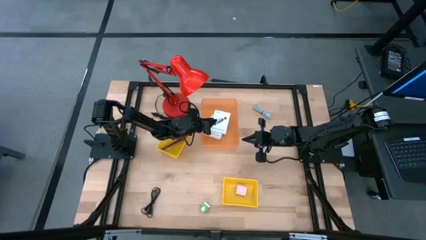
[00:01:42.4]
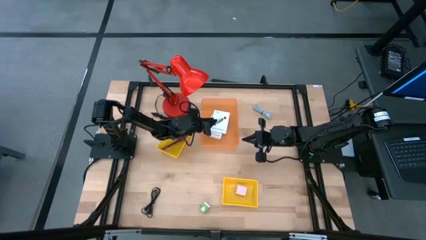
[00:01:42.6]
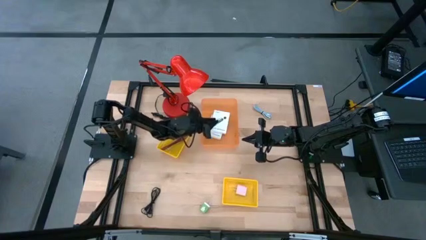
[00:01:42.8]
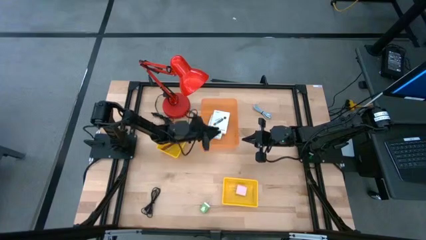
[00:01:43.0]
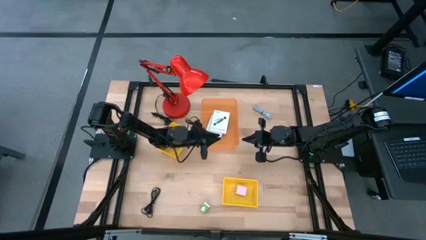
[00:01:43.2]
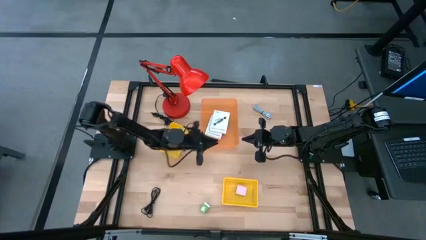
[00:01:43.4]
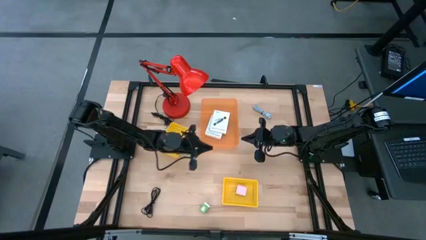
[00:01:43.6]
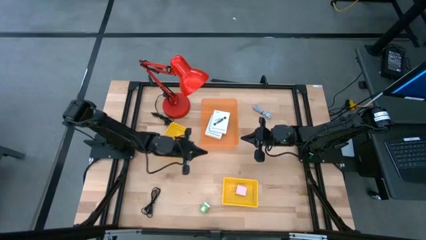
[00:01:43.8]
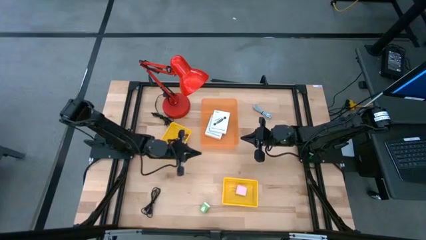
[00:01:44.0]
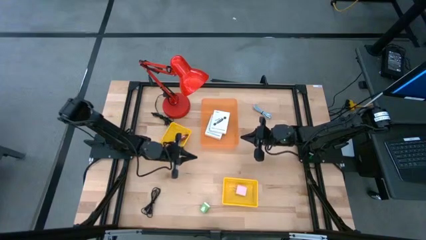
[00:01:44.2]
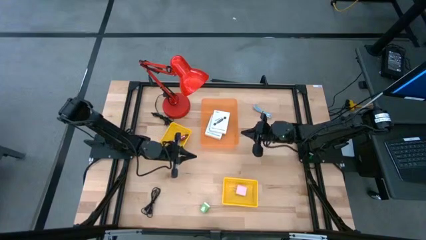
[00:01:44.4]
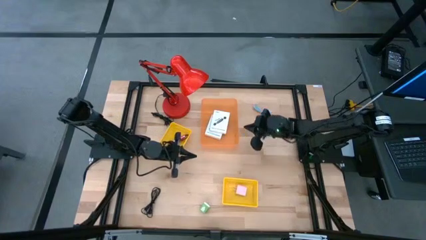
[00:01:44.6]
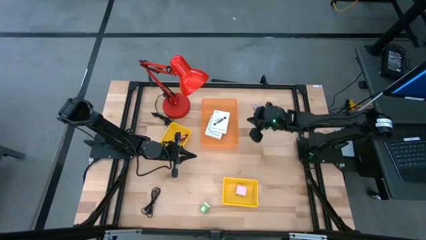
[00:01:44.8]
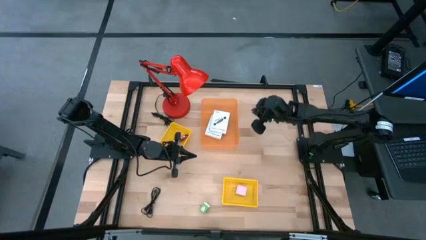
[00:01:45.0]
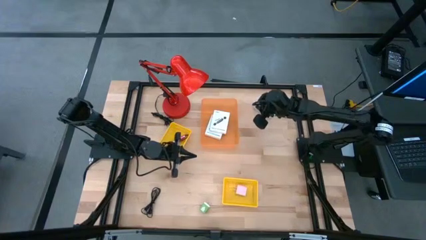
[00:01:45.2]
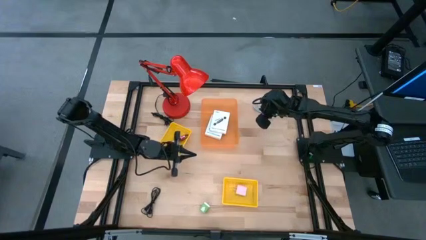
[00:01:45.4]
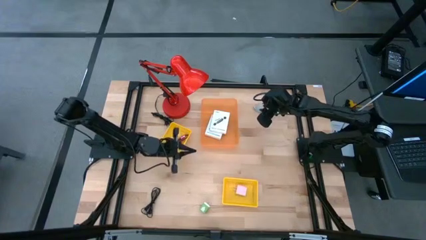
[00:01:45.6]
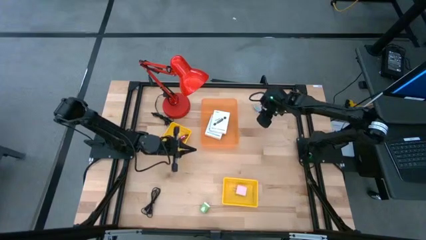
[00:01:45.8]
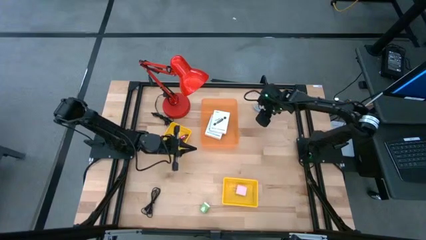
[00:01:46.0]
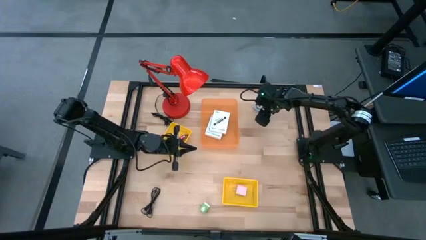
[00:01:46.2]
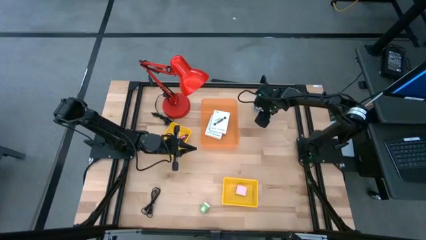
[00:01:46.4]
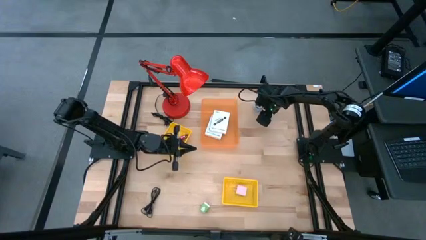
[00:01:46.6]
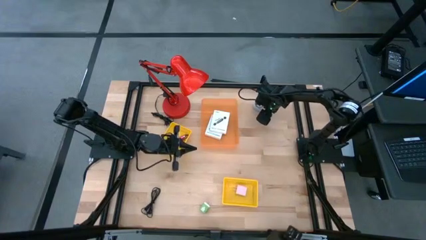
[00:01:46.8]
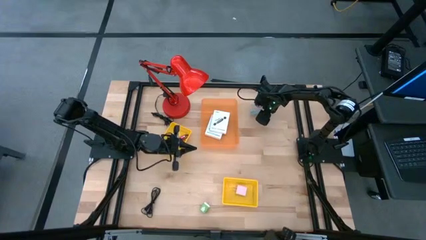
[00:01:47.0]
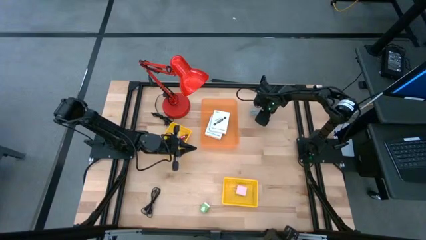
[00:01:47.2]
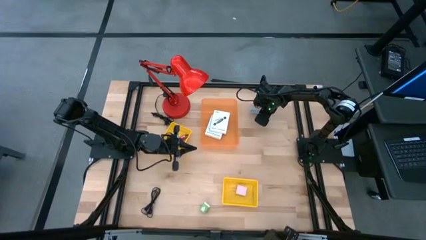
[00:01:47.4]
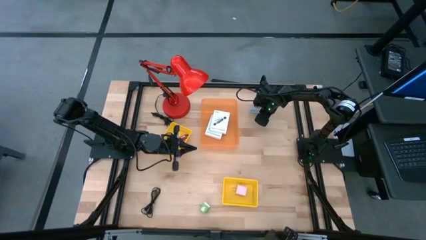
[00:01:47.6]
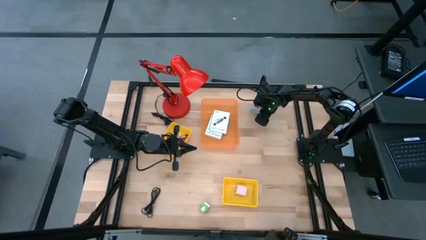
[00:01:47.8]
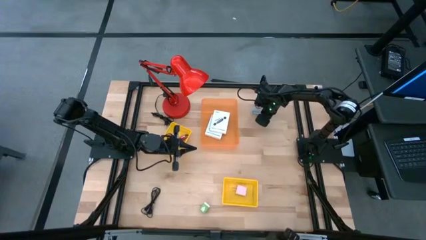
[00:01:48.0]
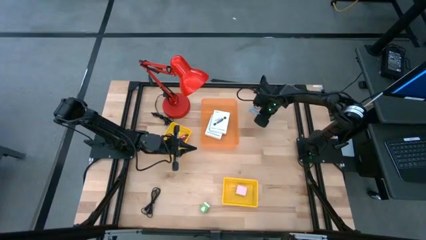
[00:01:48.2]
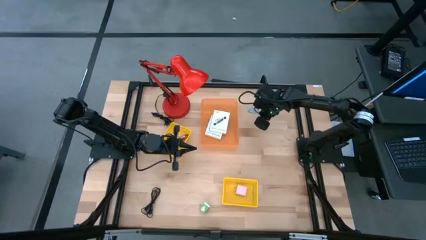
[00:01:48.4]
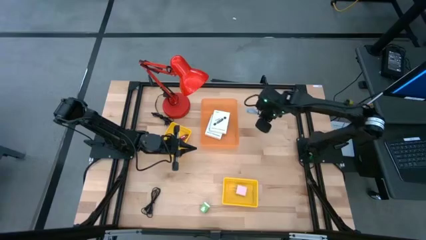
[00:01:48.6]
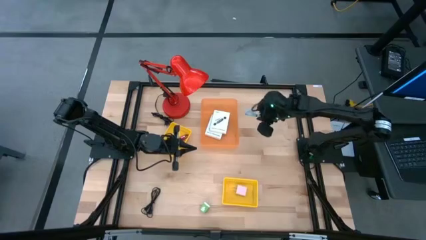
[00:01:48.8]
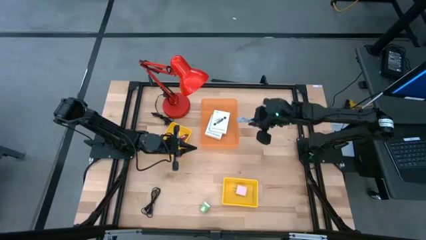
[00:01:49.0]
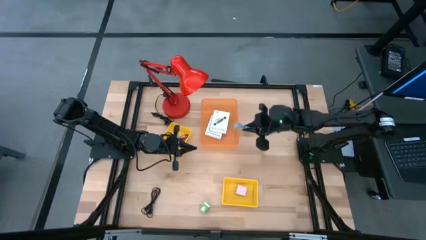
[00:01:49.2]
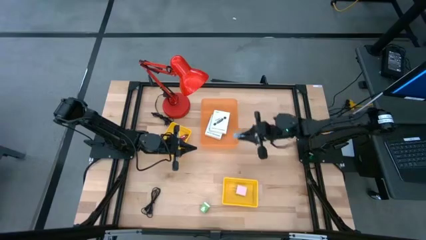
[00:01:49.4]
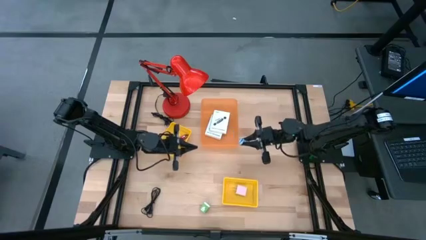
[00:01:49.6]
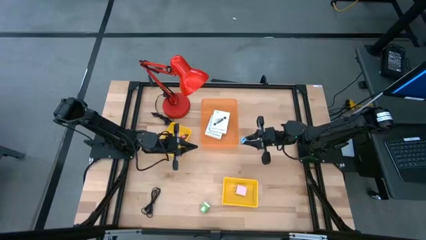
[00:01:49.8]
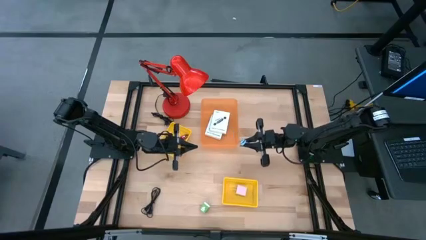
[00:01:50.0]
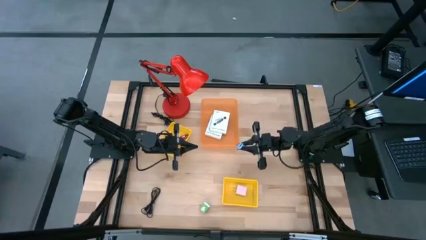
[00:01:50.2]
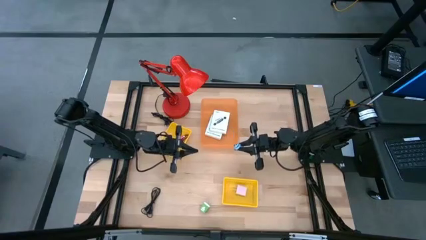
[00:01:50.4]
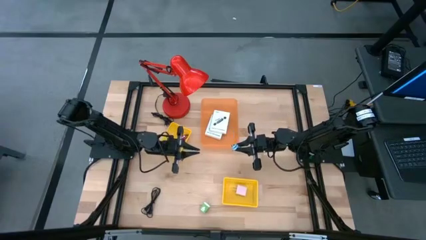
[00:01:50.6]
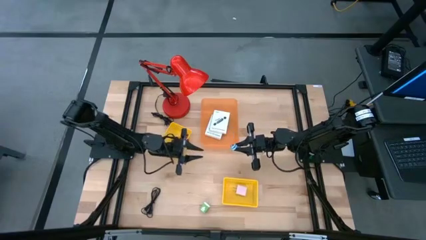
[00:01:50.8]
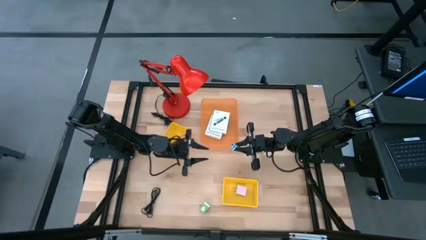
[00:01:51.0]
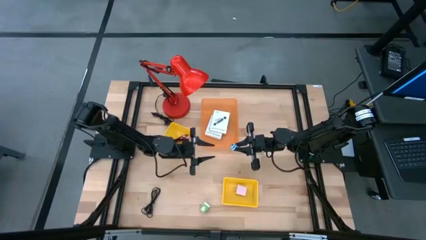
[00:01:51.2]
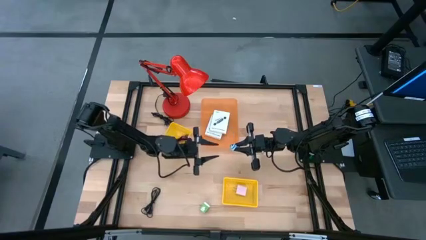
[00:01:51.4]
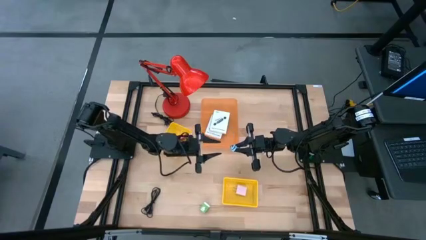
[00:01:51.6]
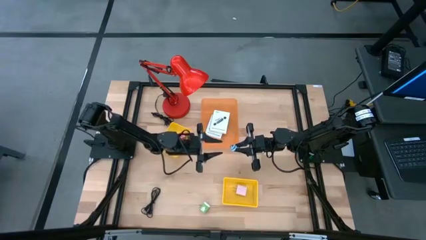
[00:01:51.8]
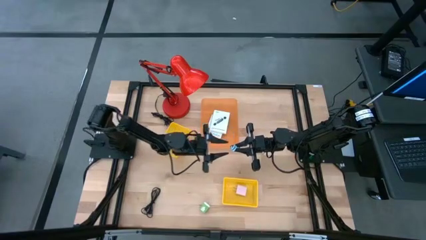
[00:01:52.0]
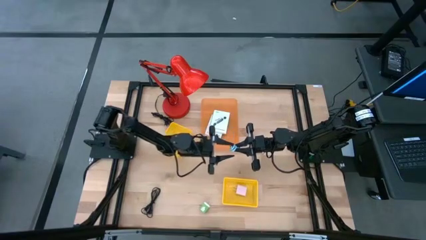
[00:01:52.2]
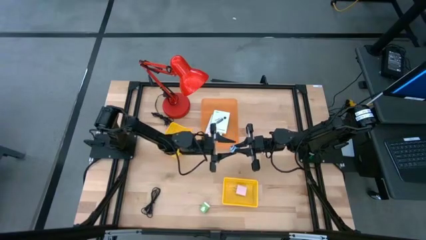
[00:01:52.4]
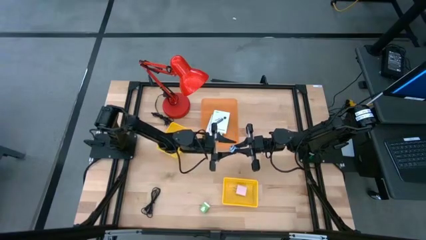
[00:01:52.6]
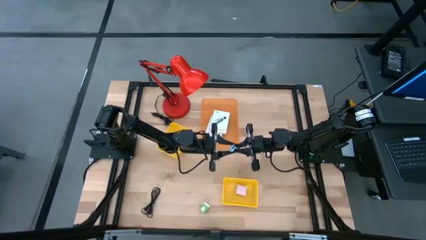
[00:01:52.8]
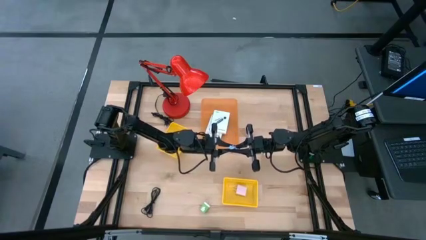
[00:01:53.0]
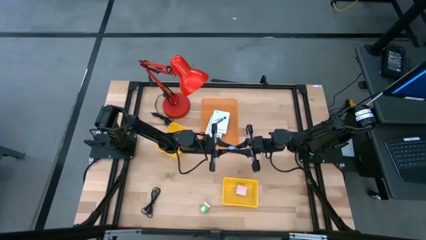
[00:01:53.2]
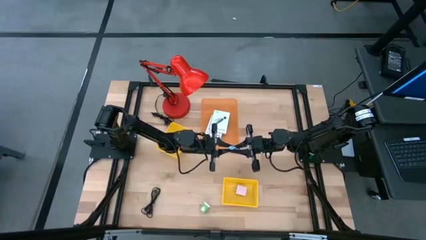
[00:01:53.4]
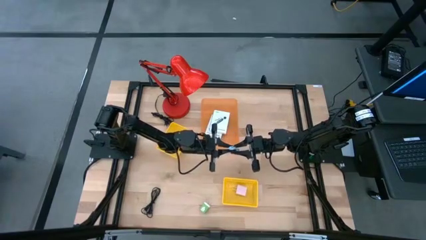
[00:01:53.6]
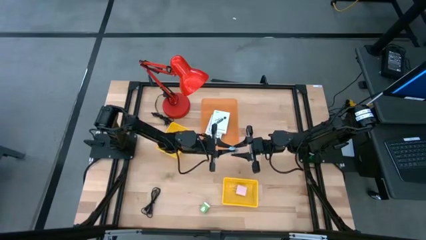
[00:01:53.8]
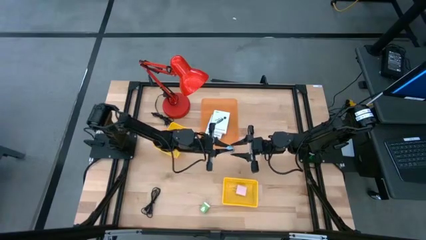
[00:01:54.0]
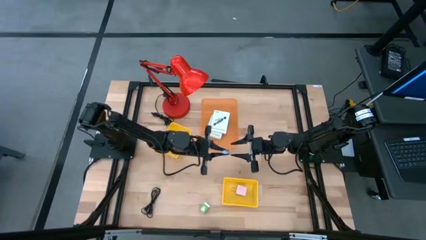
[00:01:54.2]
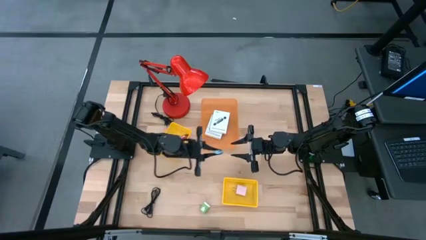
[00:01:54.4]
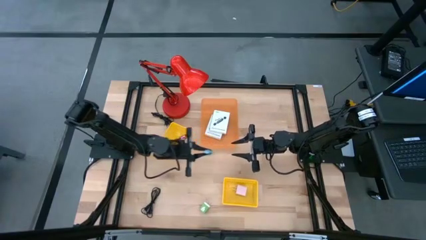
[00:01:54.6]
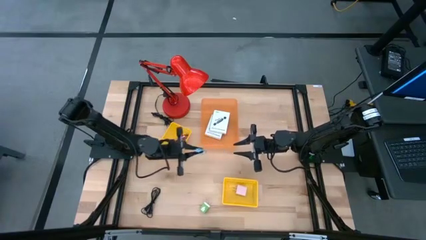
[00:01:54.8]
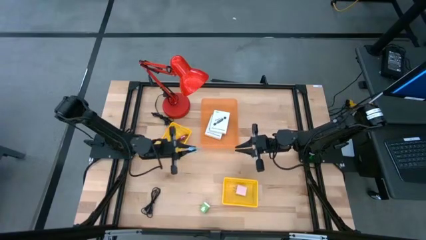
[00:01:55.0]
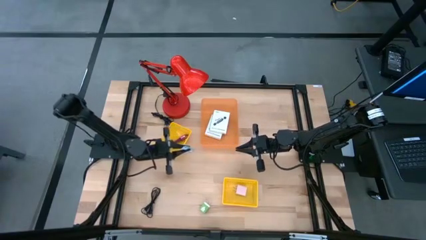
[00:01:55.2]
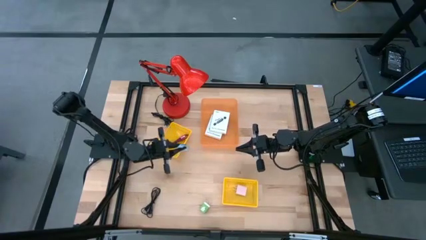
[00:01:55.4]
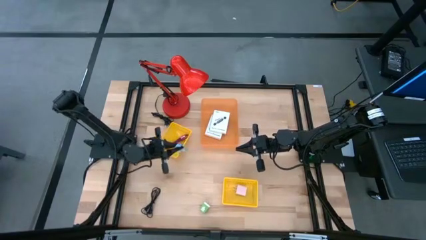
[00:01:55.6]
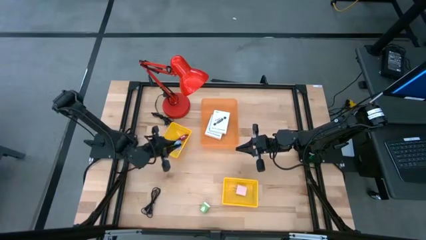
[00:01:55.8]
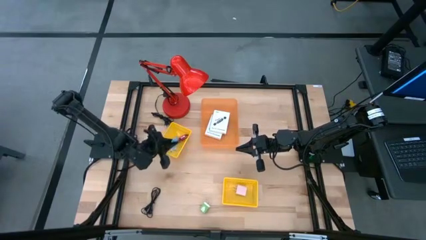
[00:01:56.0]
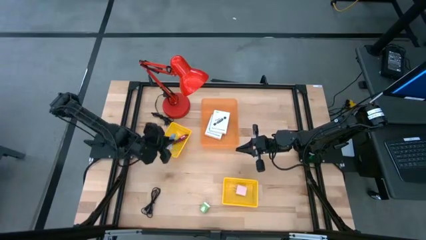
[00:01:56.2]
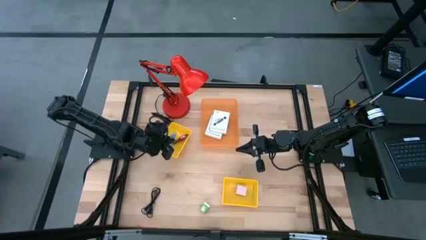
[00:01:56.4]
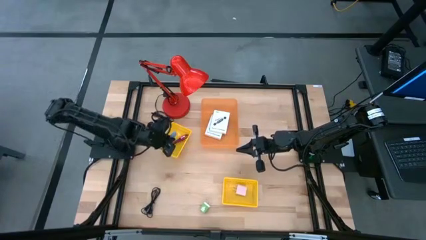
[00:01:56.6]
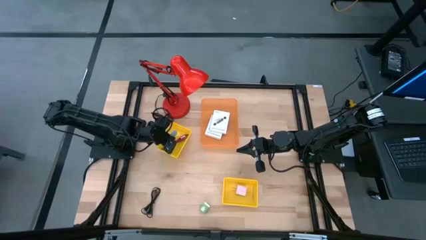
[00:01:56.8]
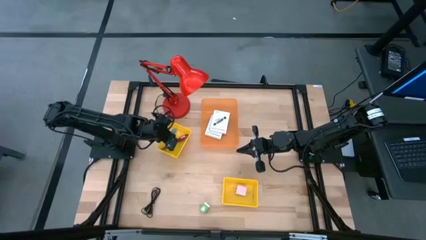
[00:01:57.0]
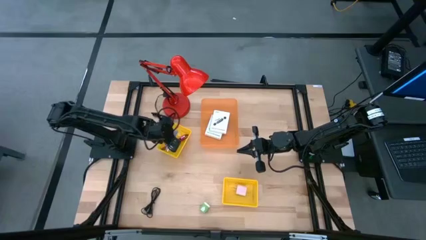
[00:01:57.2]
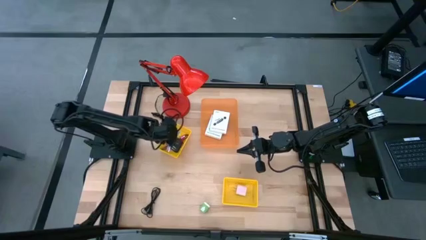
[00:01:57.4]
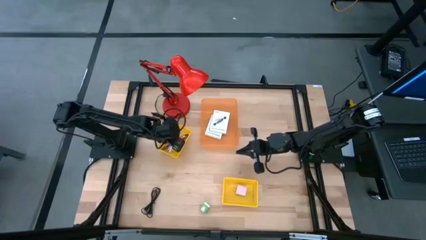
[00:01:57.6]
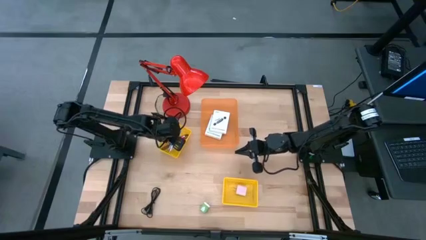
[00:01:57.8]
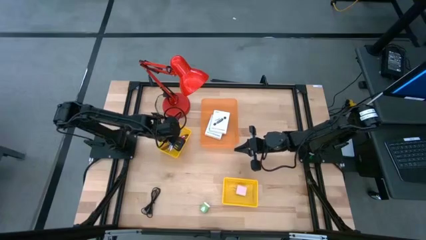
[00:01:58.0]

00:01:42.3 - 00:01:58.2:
Task: Pick and place items into bin
Put the blue charger cable into the left yellow bin
